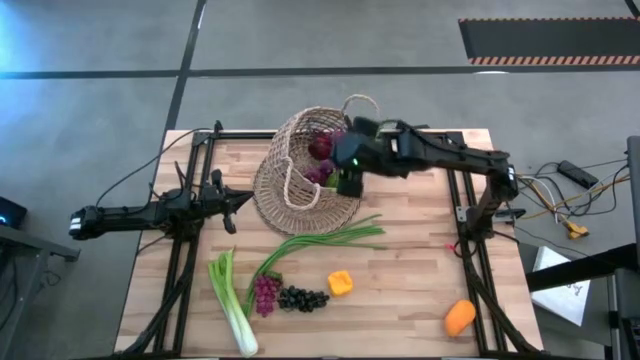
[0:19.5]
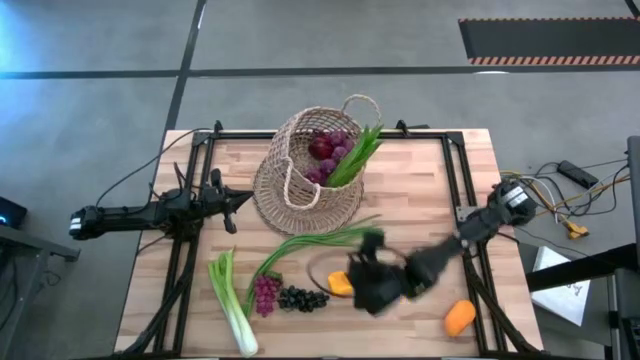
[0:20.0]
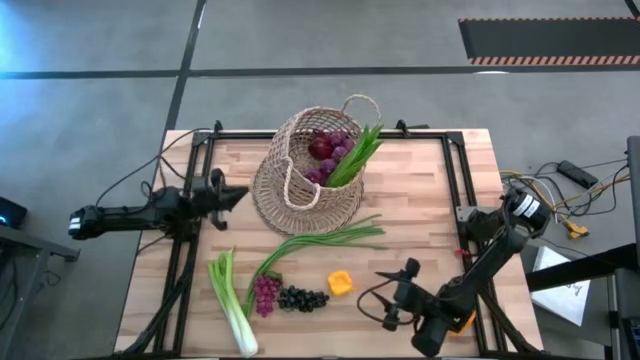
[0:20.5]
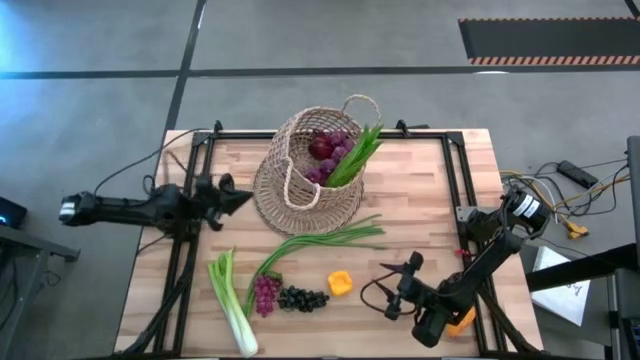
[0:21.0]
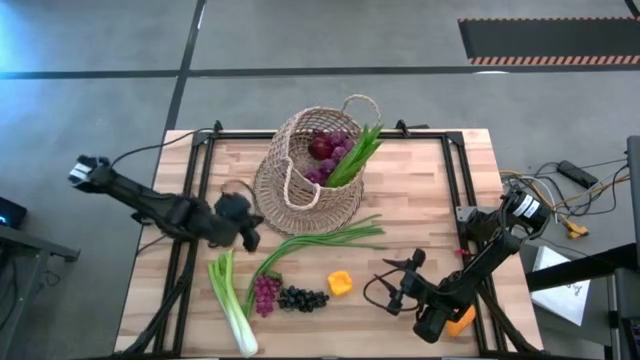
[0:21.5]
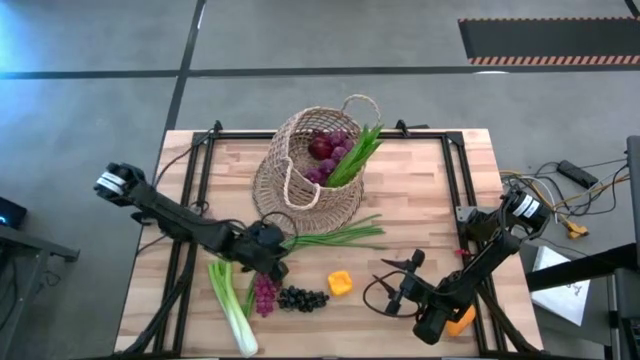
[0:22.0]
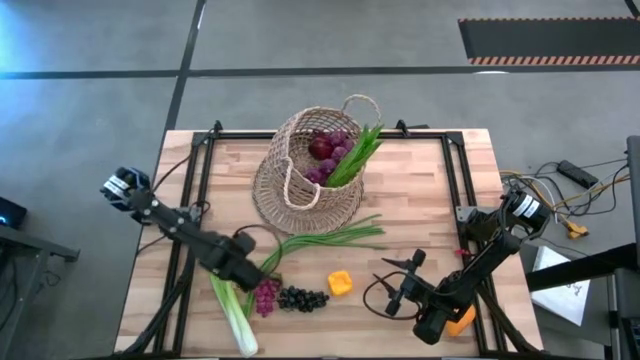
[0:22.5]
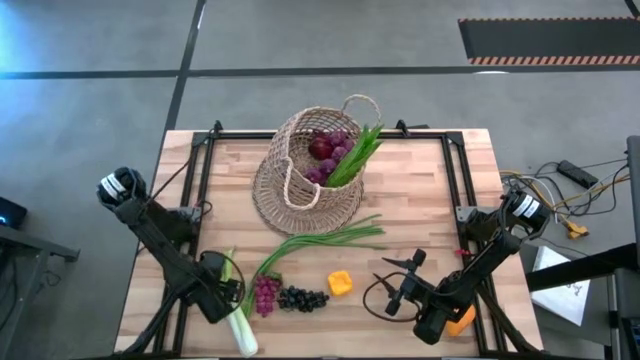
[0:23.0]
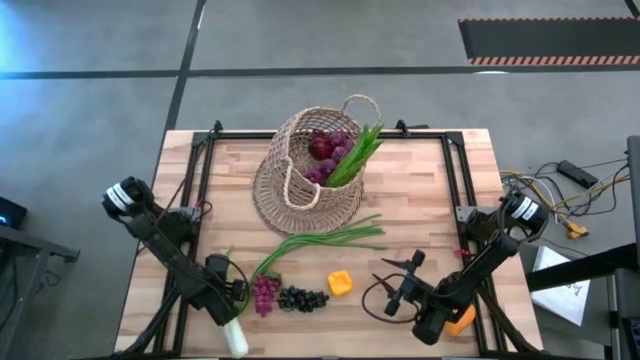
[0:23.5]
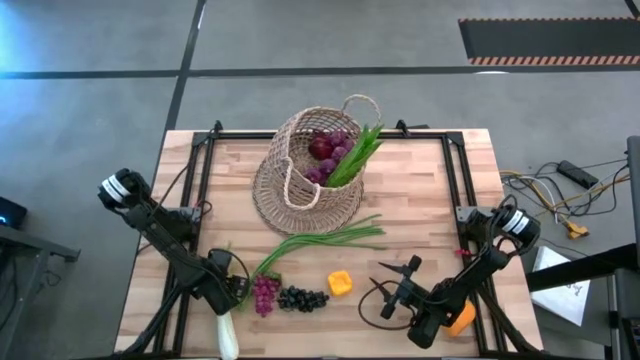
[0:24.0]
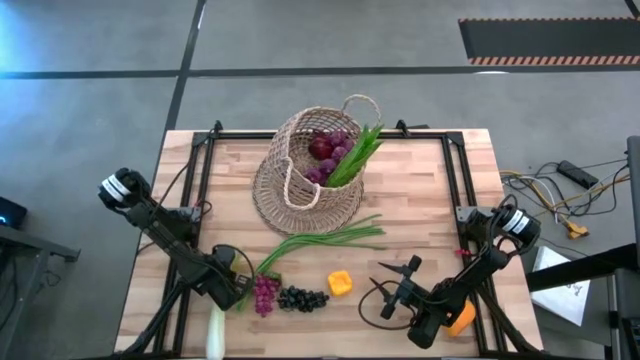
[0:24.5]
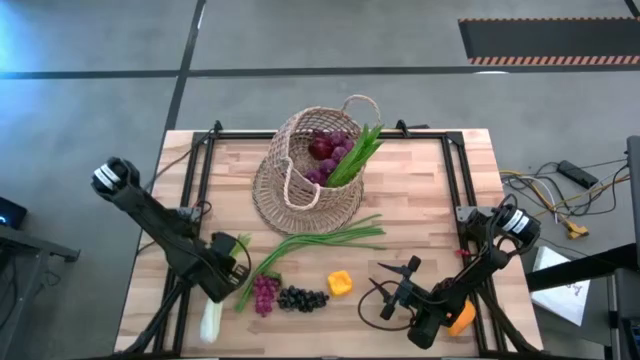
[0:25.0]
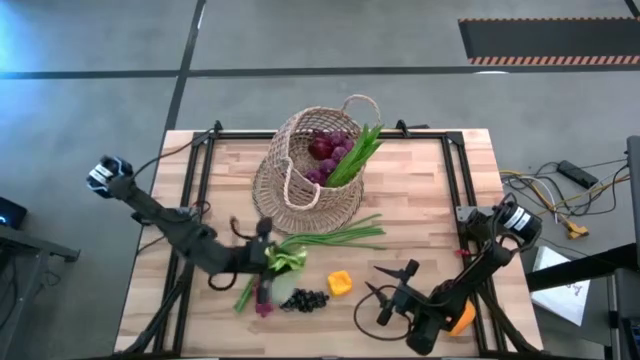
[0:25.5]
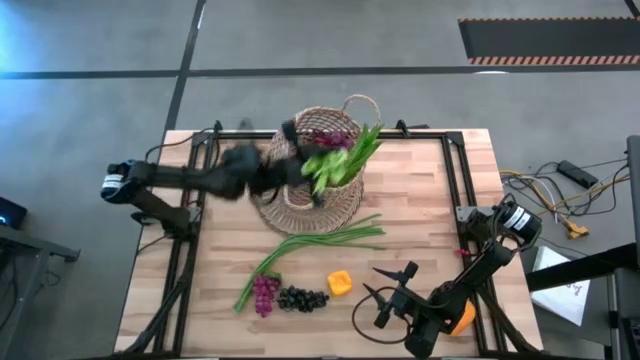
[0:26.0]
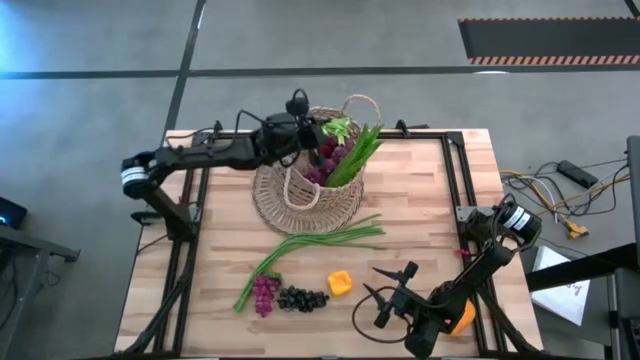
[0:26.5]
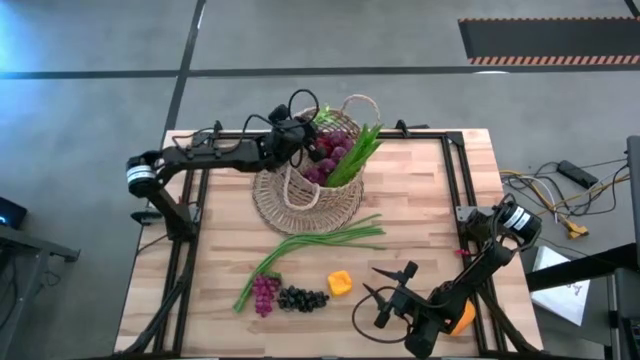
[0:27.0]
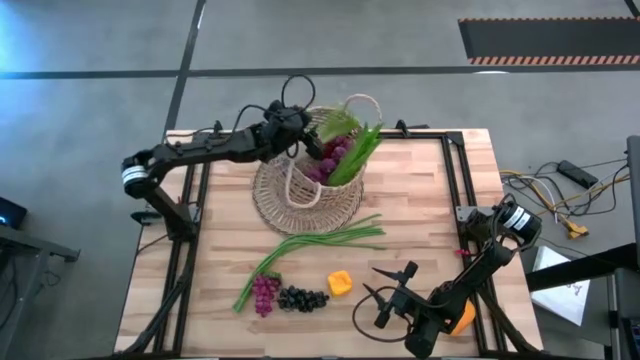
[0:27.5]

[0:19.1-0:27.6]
Task: Build produce basket
Put the green celery into the brown basket

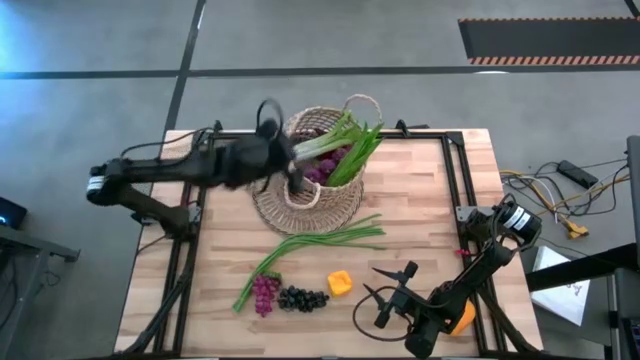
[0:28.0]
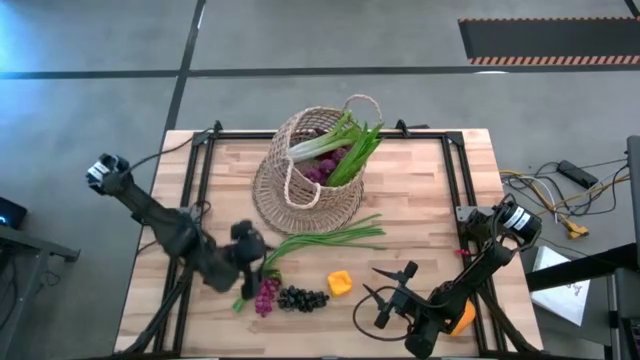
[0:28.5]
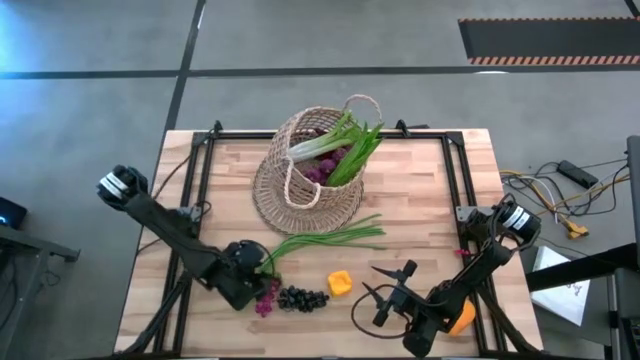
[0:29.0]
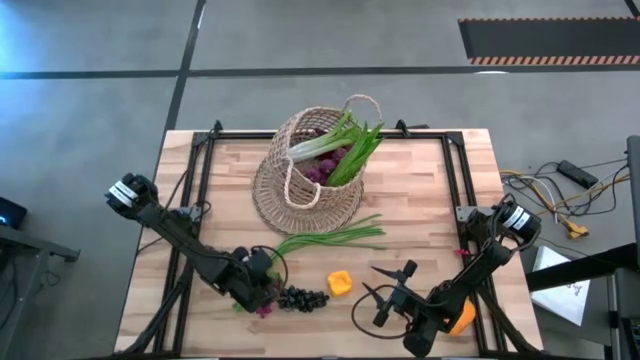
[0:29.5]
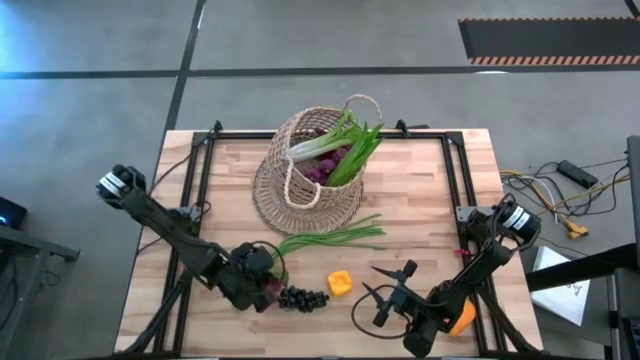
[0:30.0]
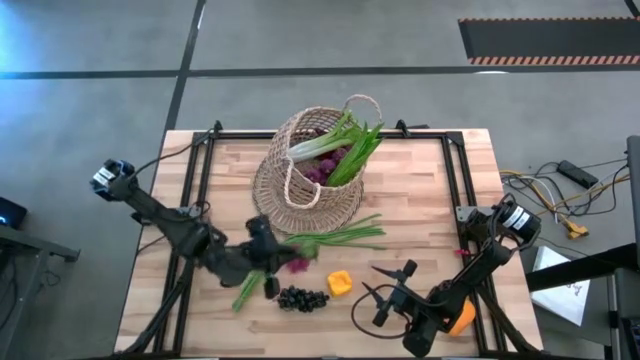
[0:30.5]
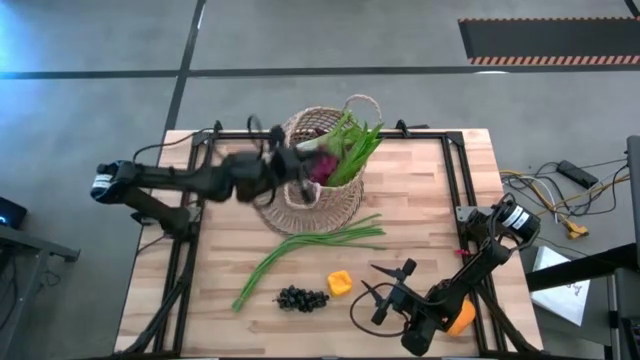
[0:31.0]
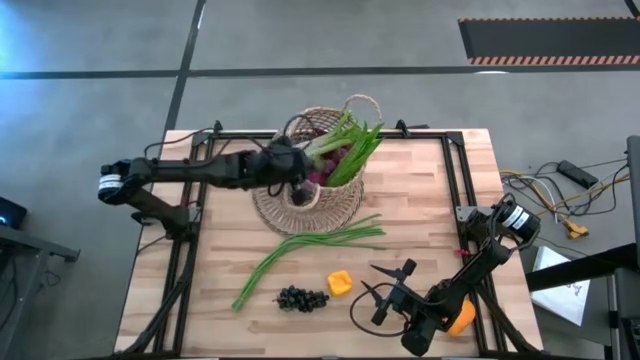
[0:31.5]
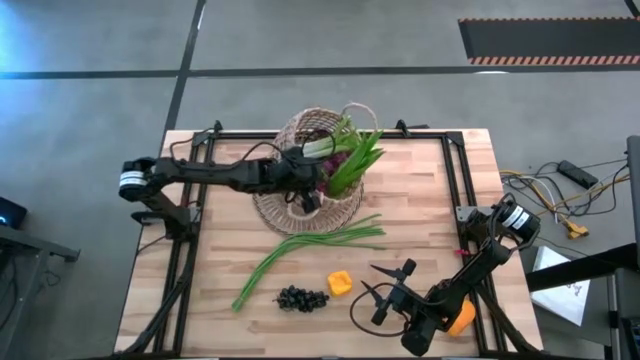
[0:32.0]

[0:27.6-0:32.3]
Put the violet grapes into the brown basket

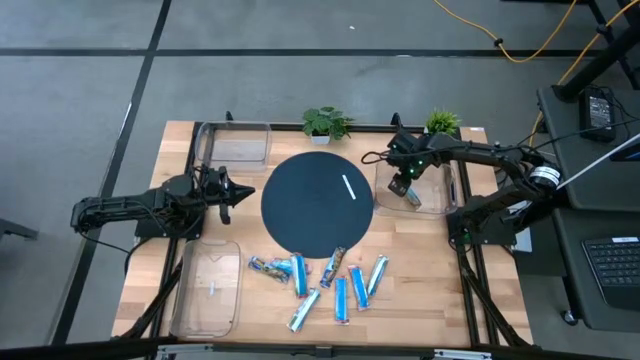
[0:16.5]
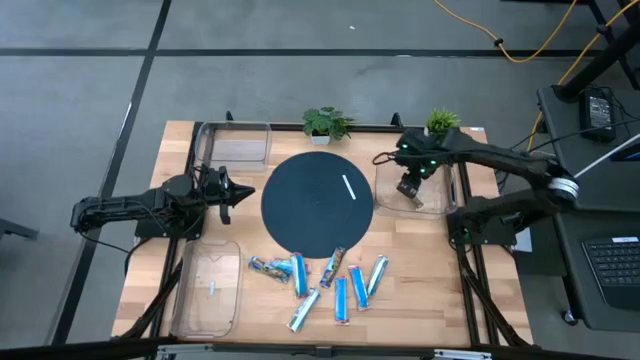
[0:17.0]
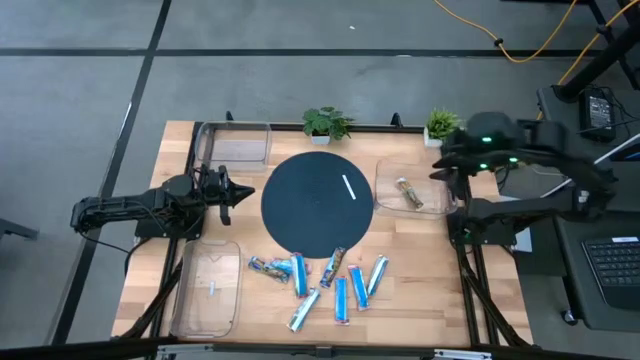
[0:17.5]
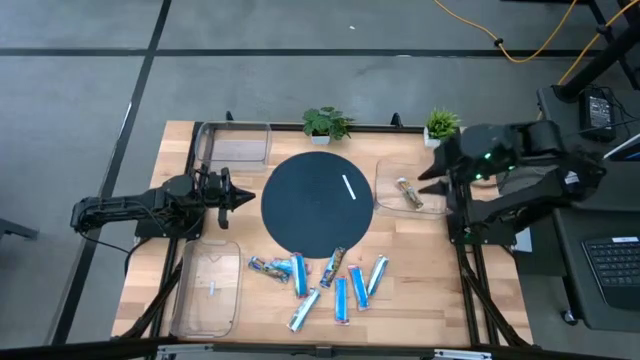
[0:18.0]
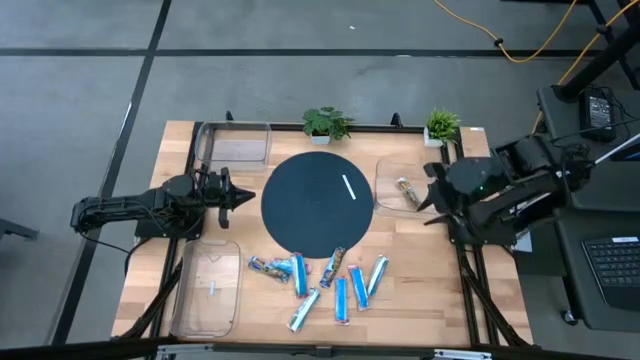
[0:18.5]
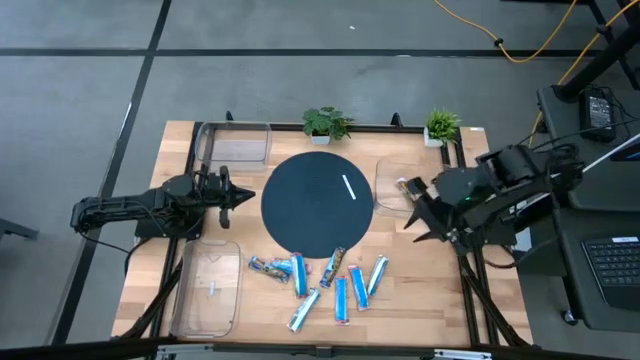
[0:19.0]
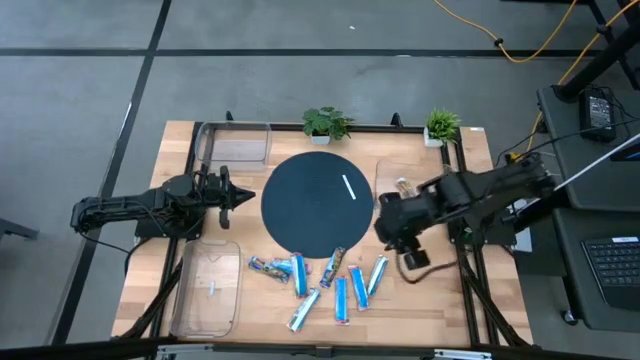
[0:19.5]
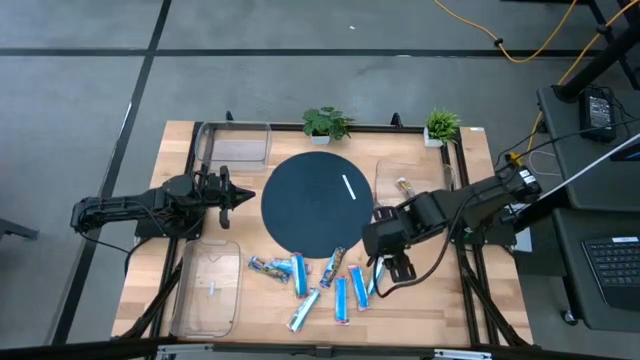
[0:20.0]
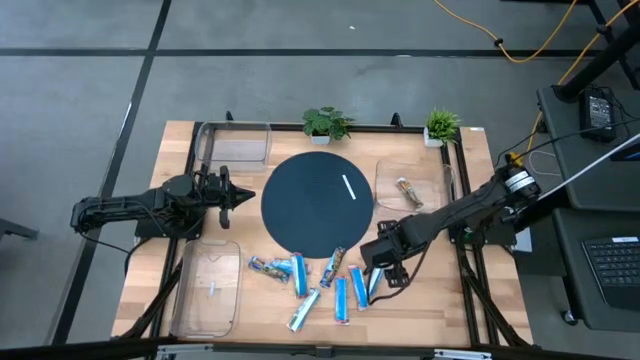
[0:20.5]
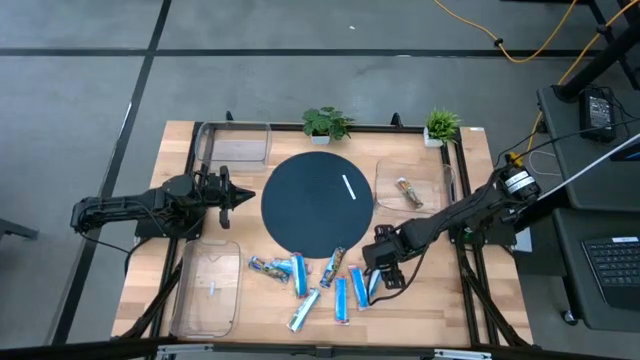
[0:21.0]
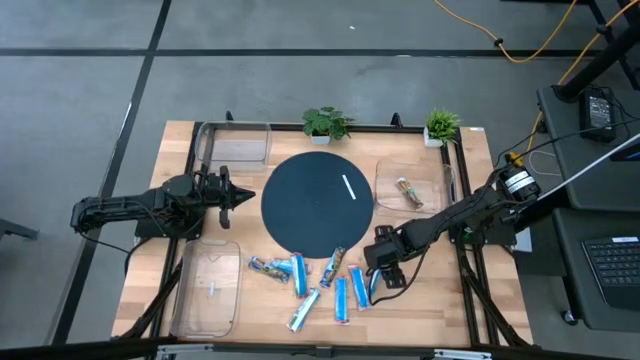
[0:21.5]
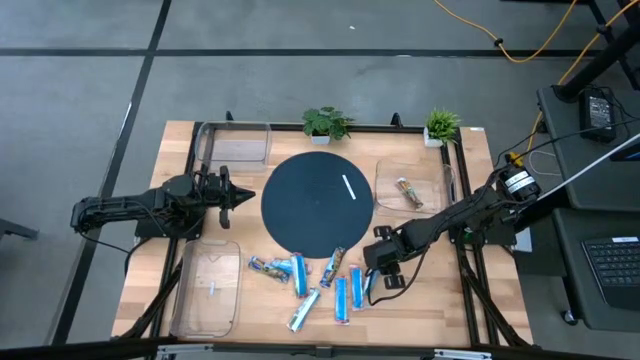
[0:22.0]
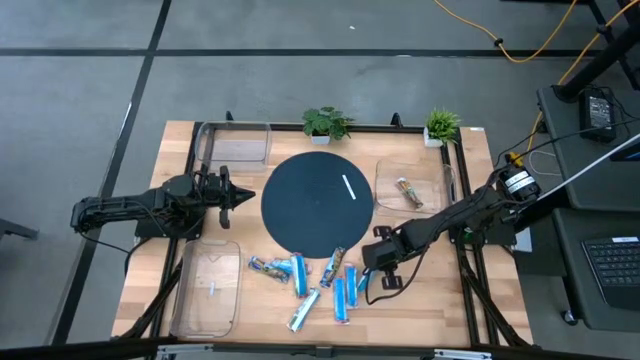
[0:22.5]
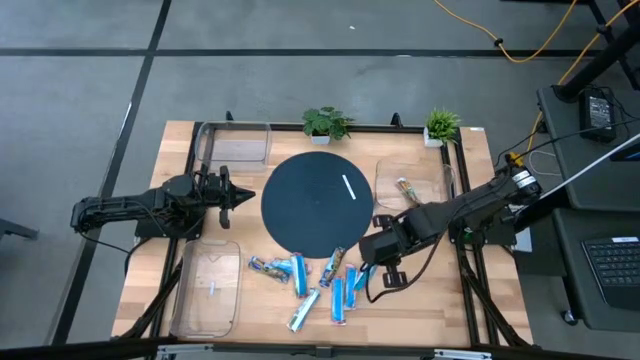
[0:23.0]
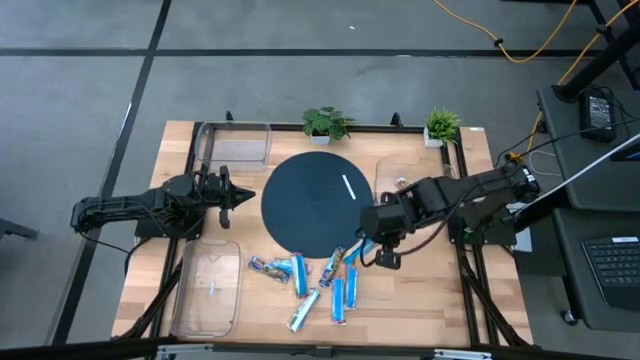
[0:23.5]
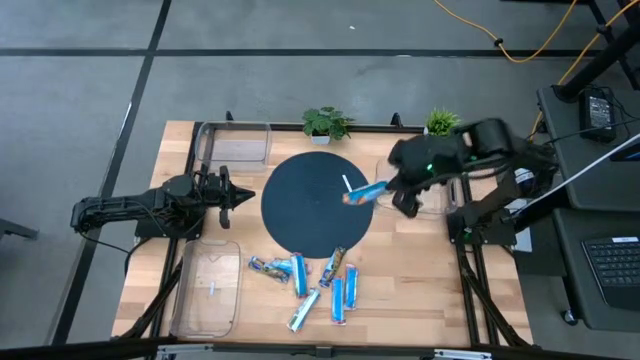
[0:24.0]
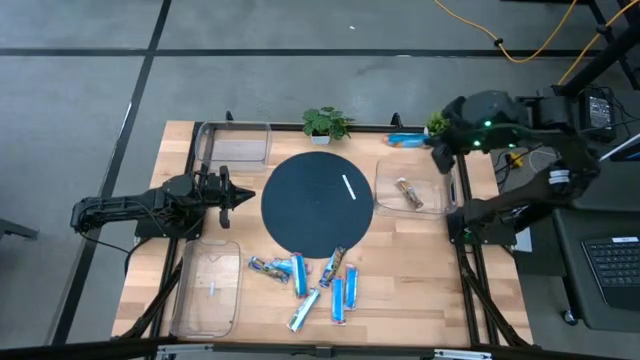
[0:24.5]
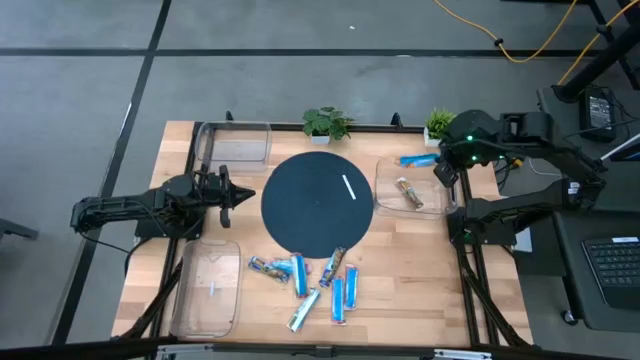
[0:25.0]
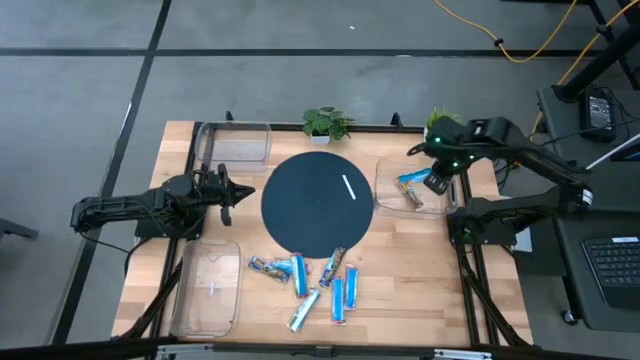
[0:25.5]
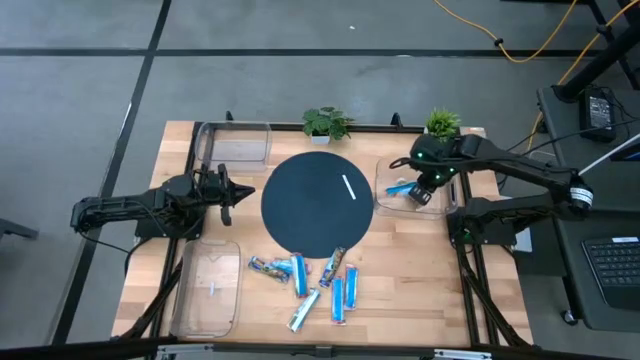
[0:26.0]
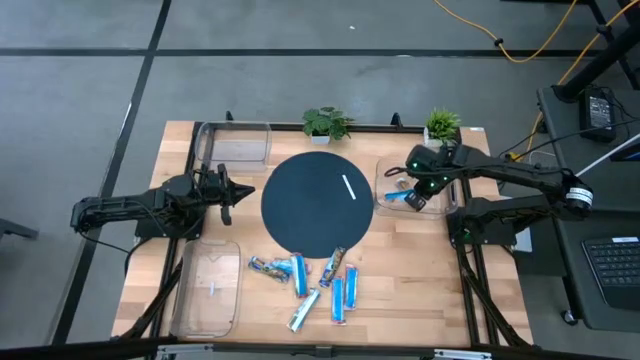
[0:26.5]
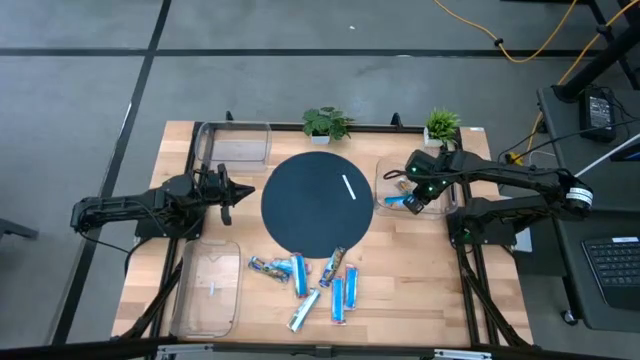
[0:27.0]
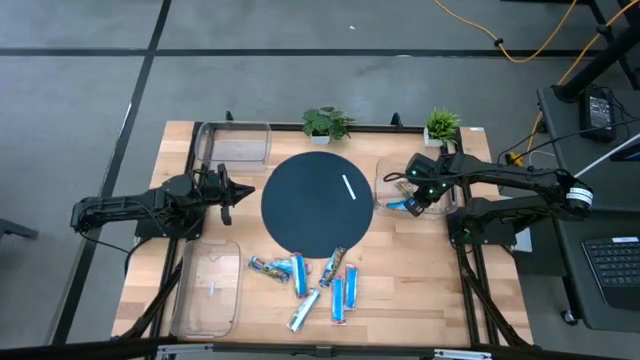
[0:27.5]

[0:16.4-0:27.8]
Task: Pick and place Granola Bars by type
Put the yellow granola bar into the top right transparent bin
